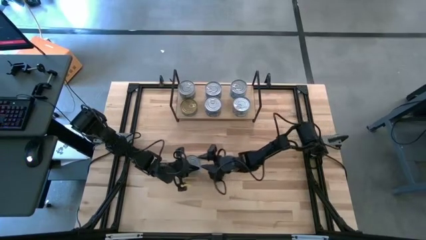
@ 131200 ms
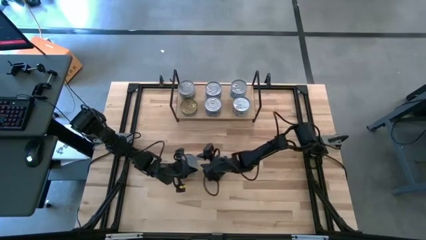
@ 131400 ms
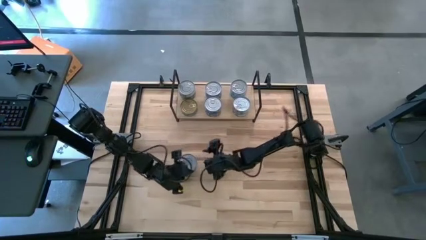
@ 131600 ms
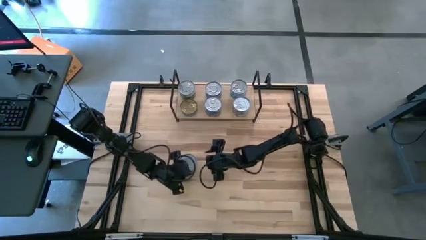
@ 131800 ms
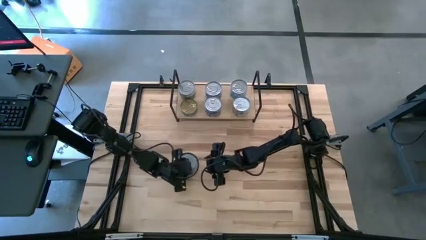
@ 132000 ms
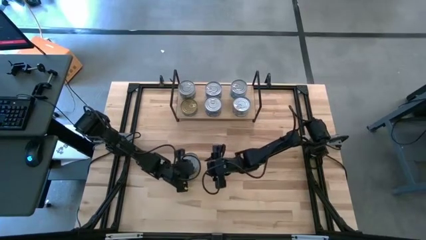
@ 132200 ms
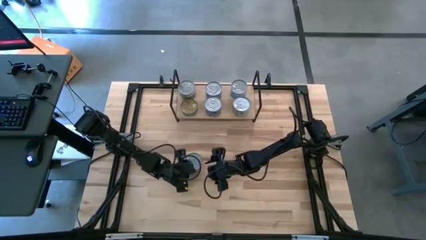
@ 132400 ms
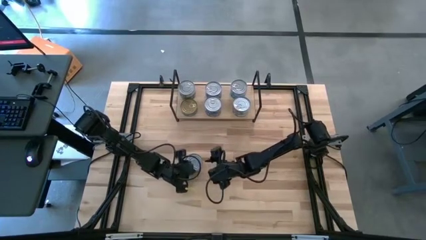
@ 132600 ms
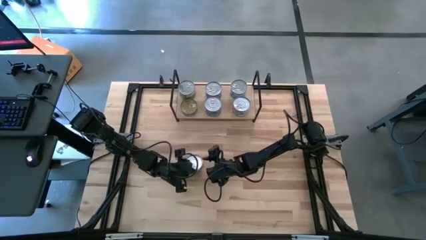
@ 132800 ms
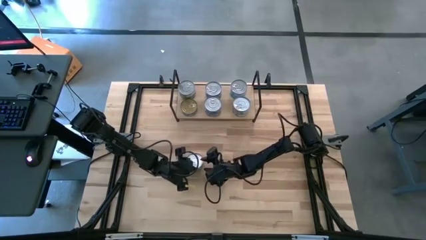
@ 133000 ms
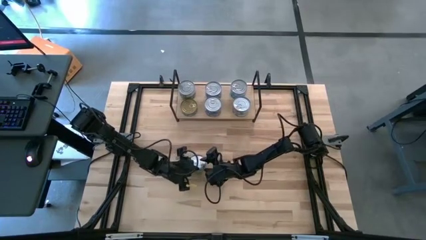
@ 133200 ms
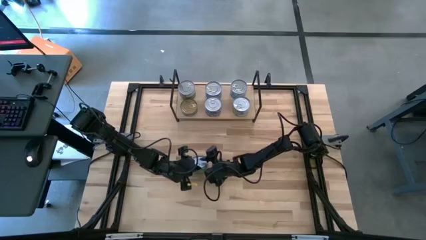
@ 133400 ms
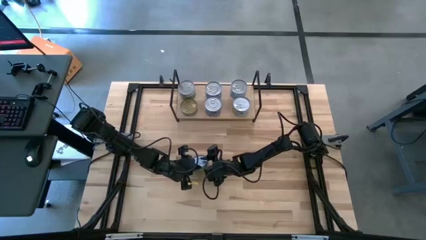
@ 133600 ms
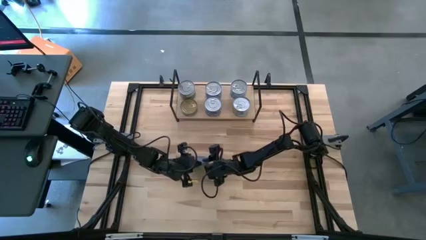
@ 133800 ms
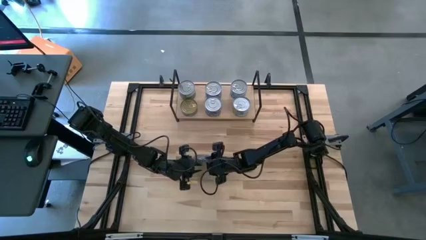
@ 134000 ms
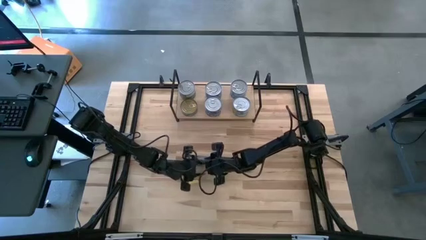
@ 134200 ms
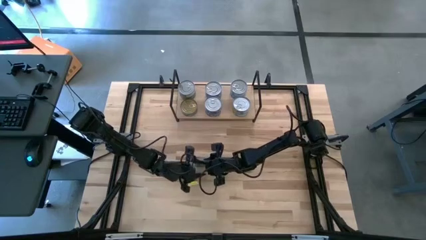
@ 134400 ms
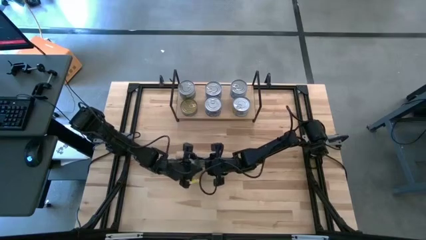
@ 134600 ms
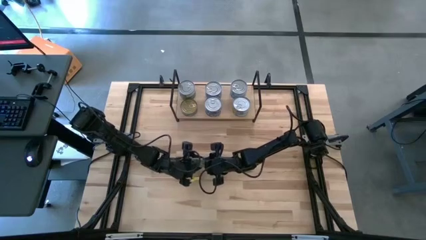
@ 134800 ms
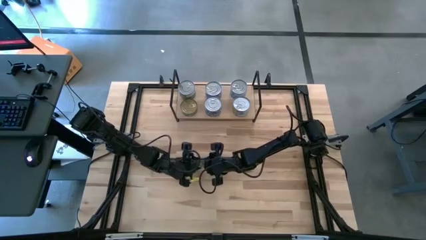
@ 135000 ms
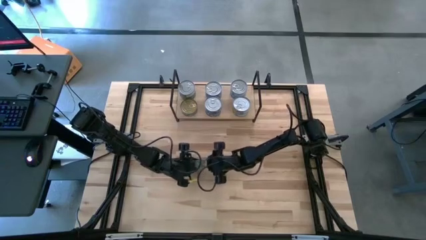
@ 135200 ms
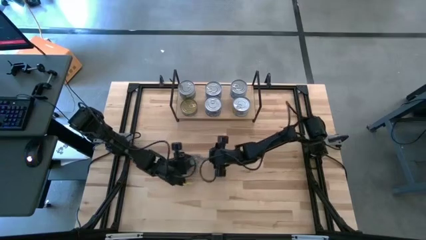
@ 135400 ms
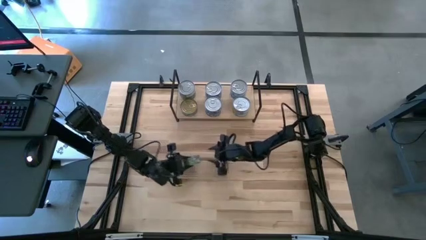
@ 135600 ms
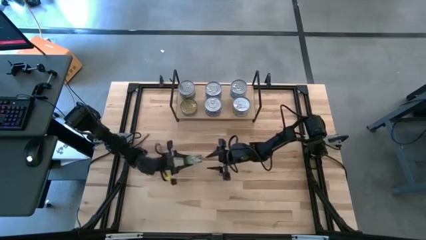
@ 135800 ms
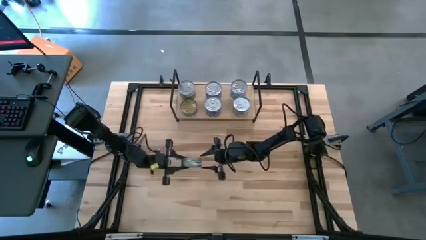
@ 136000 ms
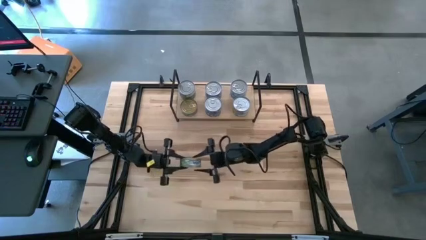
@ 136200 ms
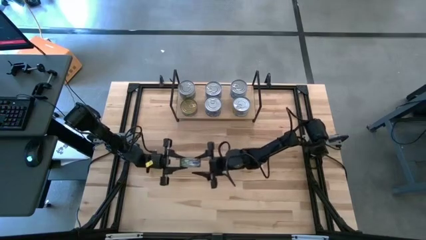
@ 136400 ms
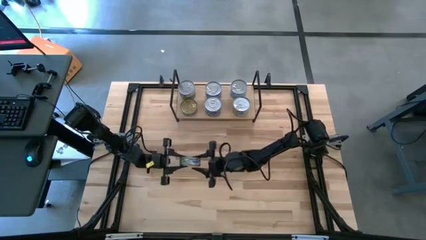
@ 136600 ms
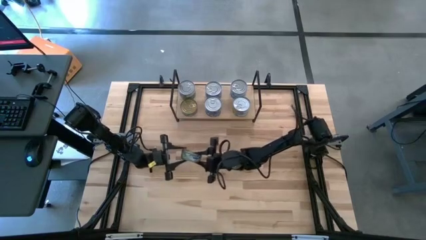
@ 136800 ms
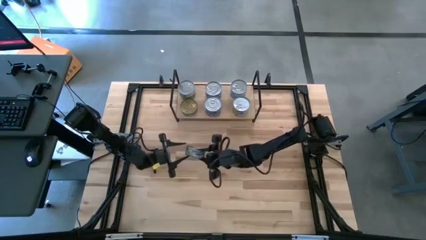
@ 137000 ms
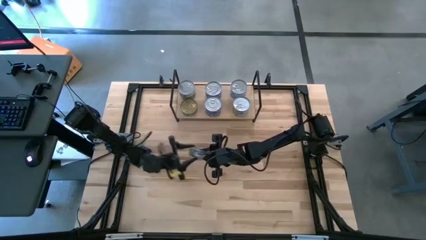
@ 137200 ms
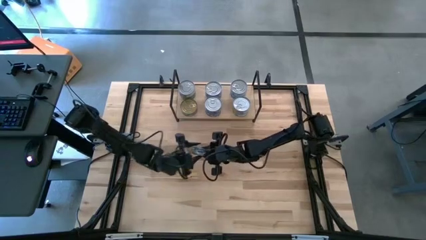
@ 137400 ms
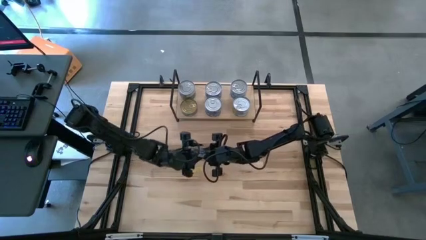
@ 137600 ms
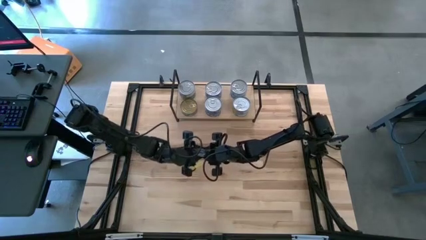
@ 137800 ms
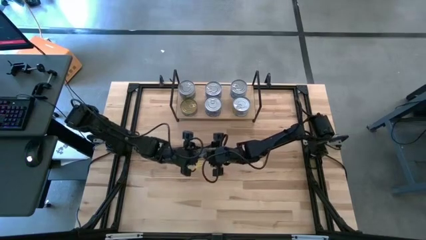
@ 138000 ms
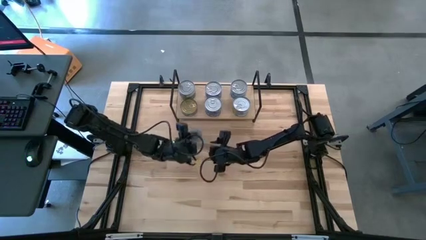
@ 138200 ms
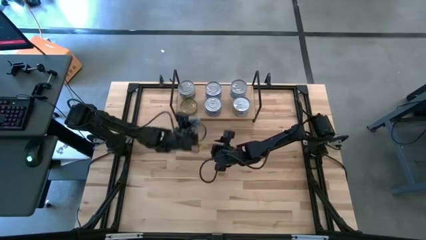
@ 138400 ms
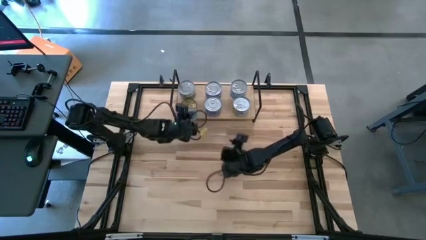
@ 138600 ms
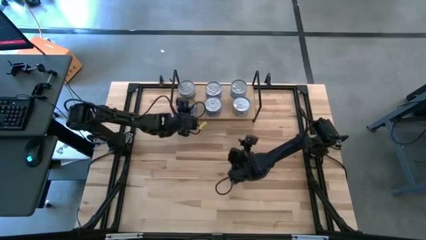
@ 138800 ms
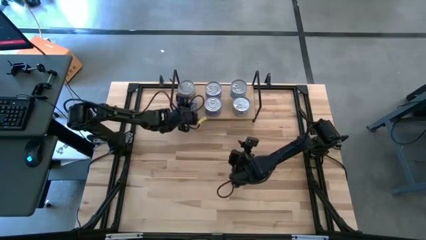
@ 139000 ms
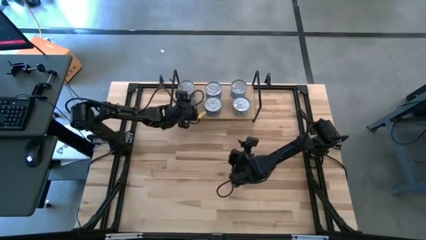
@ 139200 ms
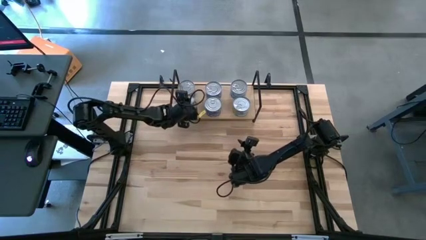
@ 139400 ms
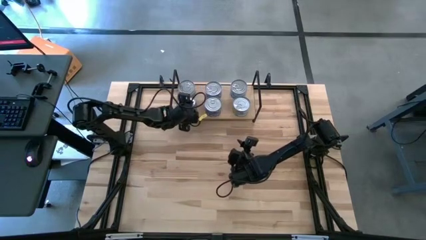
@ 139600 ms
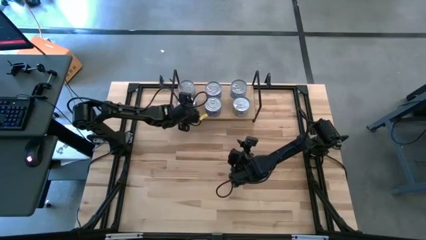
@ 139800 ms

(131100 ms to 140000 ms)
Task: Stack canned seafood by type on shelf
Stack the green tuna can on the shelf

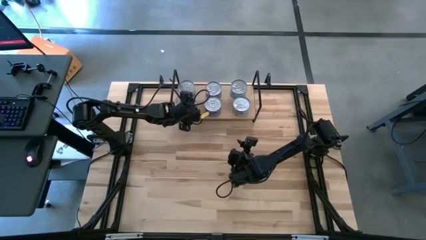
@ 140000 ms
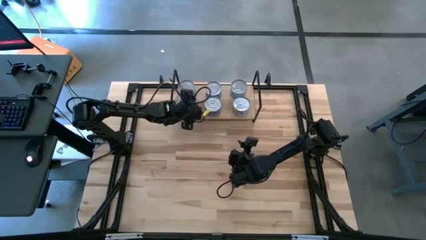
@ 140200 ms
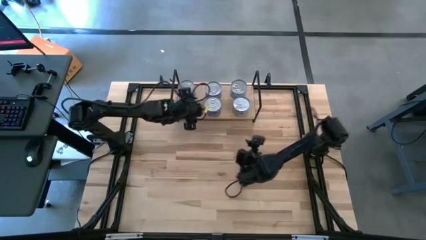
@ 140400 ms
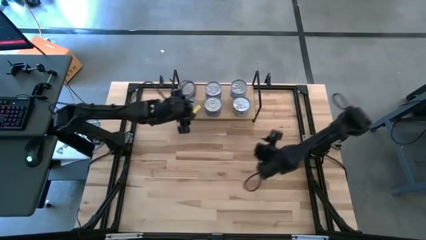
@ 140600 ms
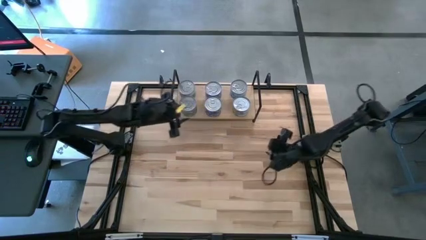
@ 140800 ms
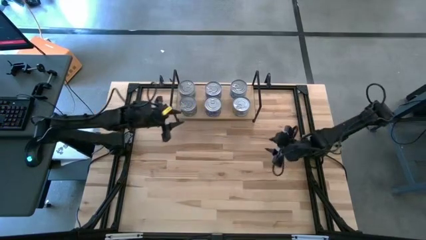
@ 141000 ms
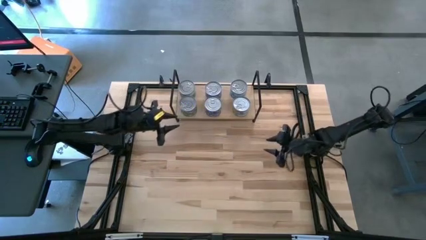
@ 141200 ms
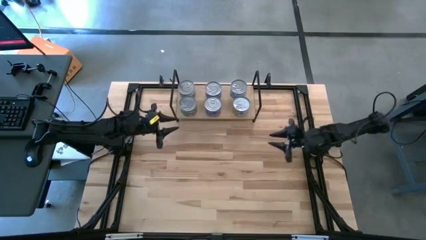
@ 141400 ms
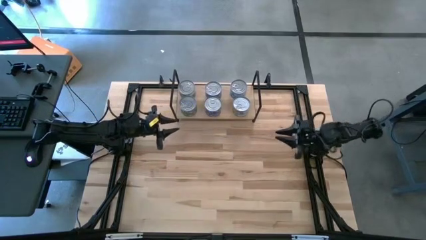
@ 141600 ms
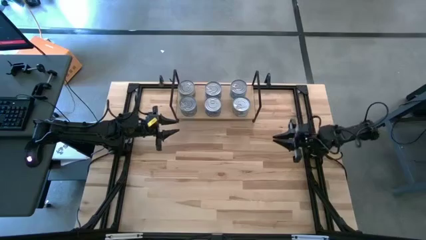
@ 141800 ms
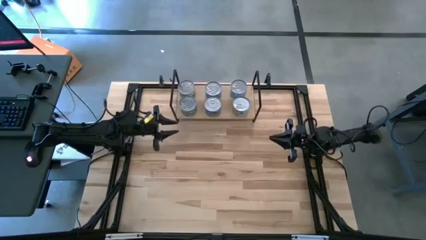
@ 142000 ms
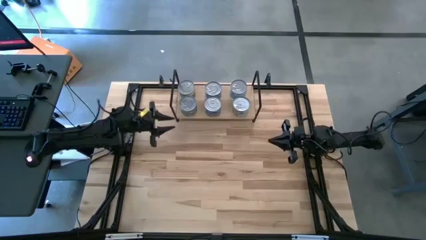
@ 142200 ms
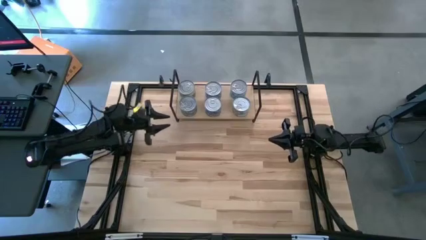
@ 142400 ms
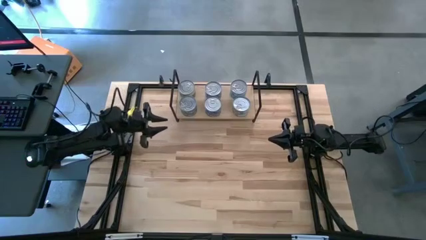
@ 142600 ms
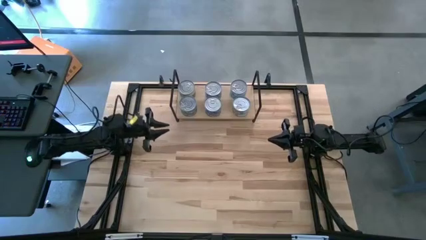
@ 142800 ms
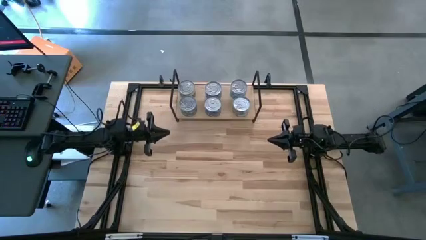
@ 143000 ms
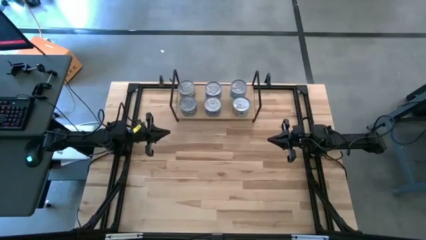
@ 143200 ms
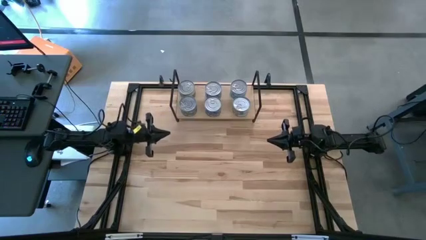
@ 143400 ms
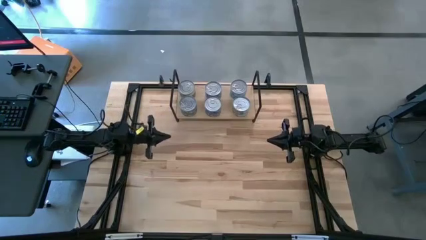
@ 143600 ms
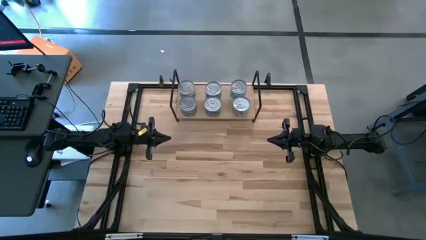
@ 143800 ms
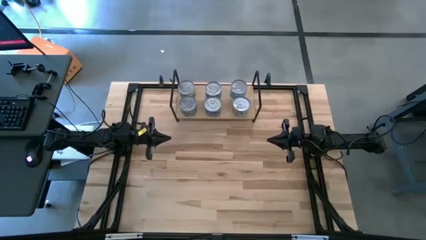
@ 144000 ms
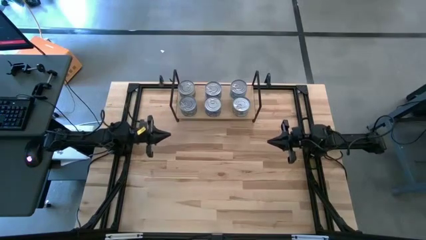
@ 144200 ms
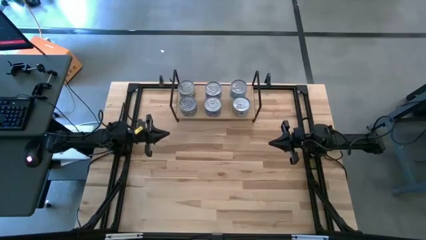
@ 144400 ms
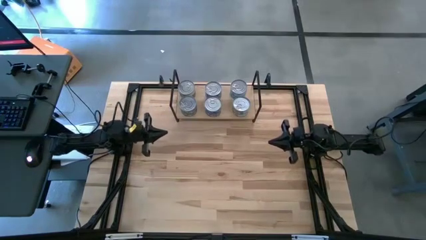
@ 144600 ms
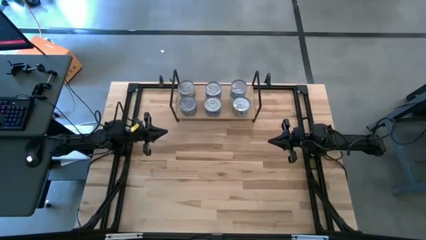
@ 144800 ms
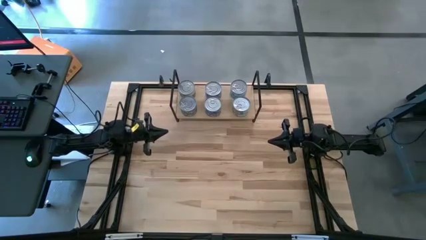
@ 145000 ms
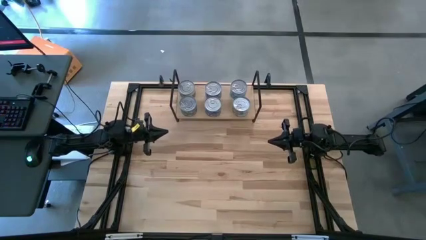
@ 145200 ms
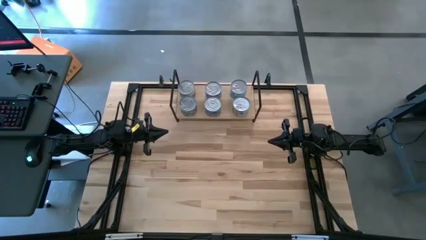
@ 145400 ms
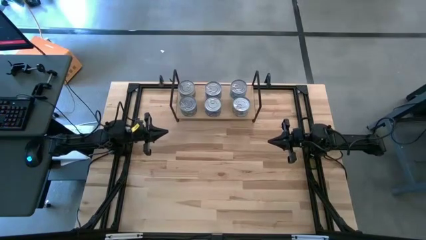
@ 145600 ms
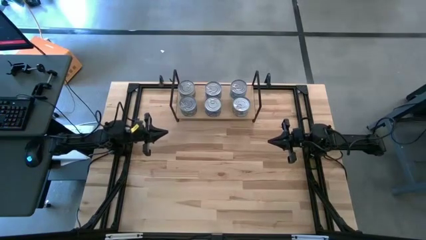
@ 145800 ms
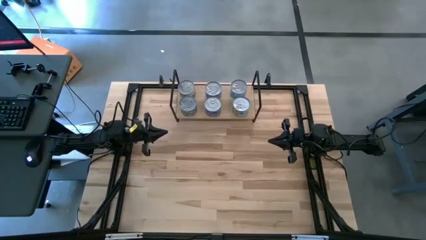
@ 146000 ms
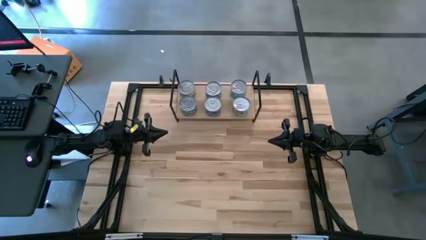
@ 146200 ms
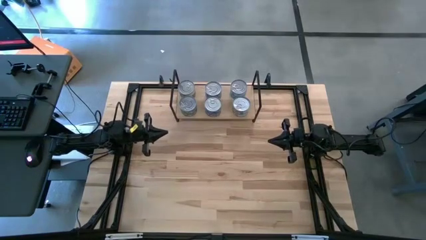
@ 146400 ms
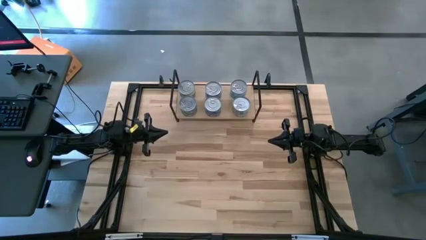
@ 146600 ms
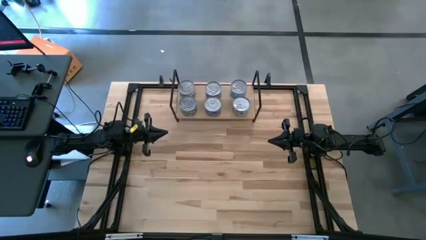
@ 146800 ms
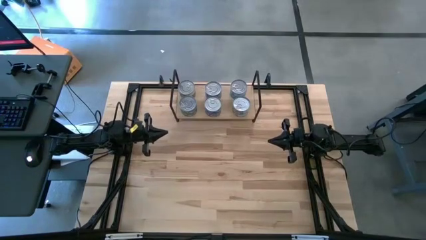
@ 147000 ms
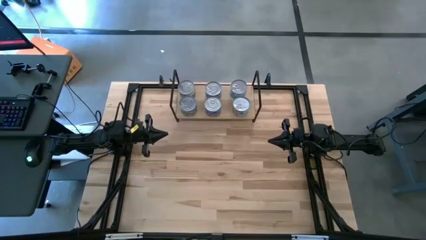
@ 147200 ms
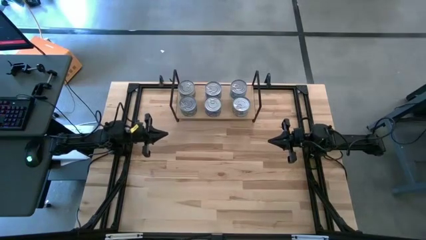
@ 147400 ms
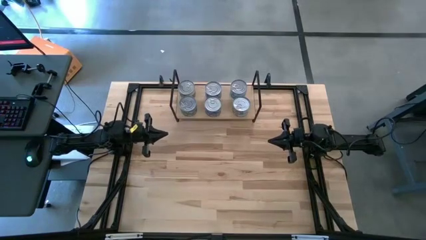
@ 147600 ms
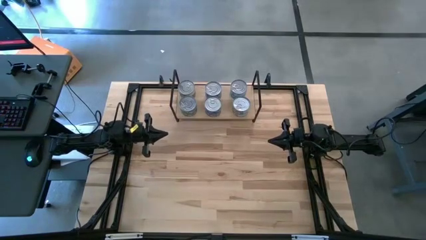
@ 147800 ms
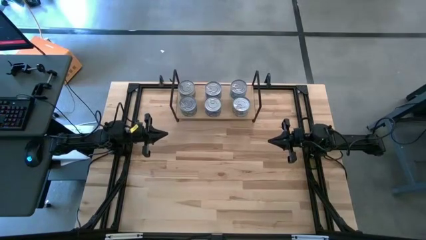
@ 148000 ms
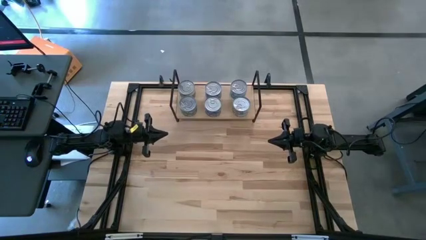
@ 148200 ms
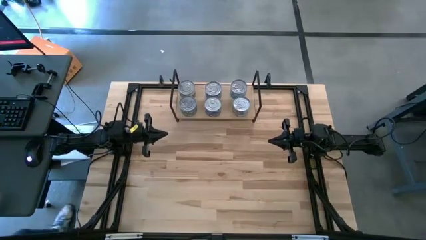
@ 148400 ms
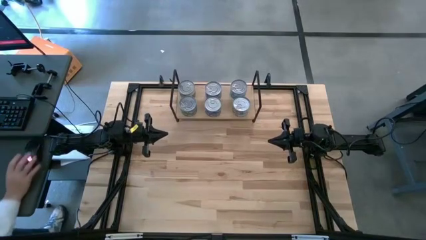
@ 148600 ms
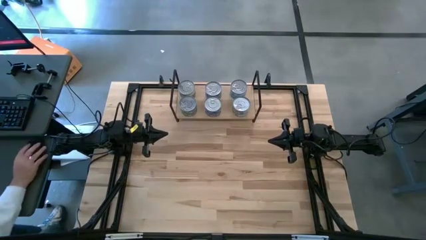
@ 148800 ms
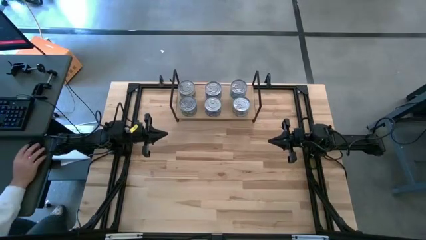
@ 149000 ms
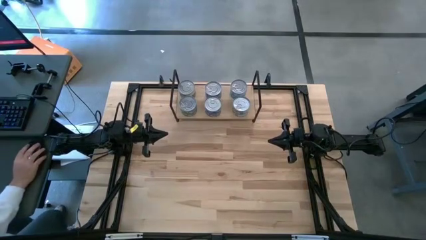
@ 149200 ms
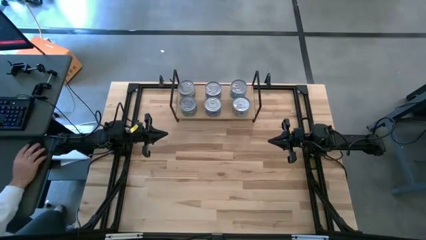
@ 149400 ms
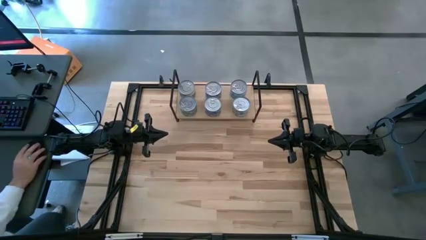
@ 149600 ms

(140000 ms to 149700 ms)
Return to Home Position
